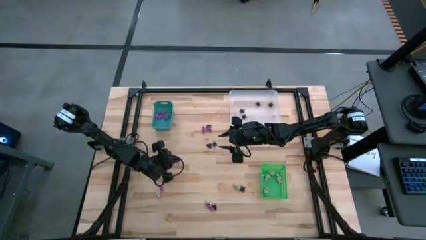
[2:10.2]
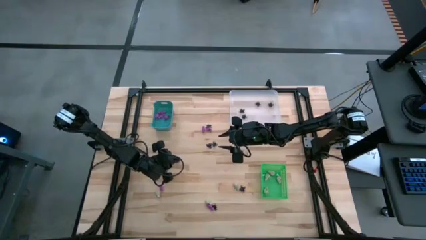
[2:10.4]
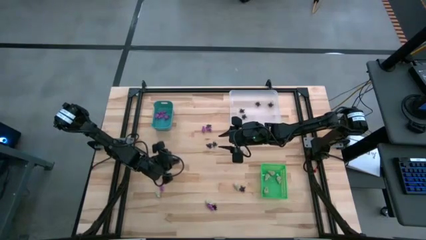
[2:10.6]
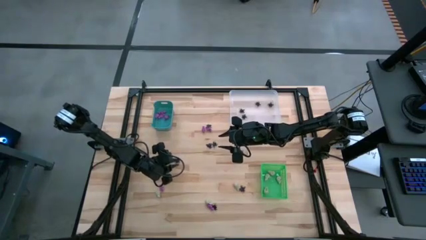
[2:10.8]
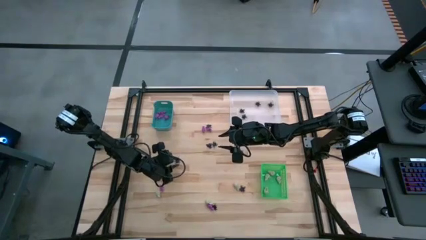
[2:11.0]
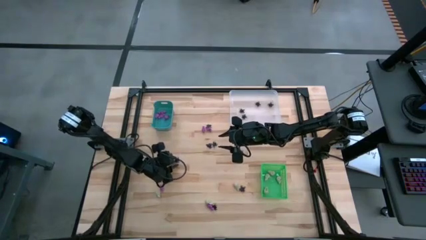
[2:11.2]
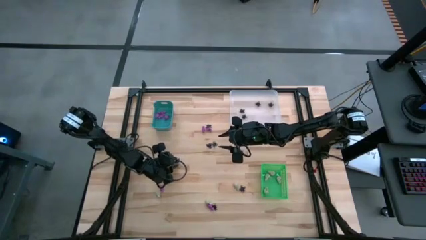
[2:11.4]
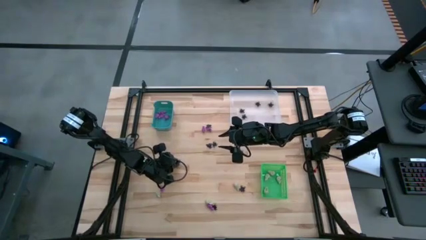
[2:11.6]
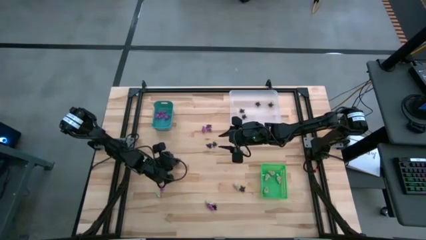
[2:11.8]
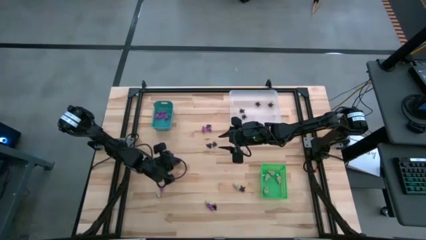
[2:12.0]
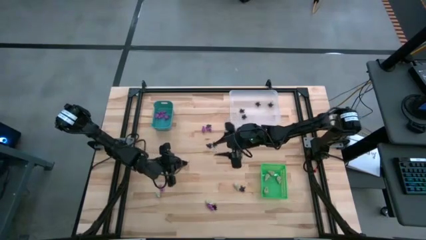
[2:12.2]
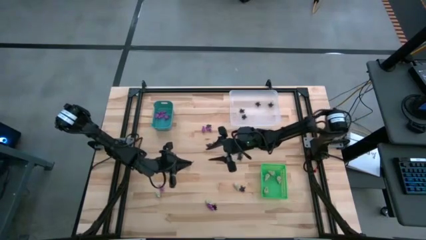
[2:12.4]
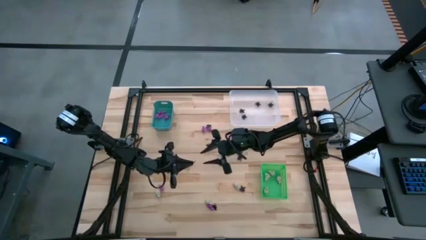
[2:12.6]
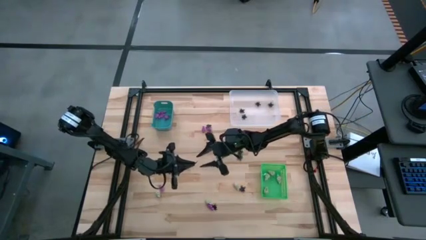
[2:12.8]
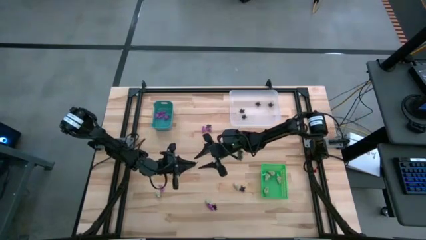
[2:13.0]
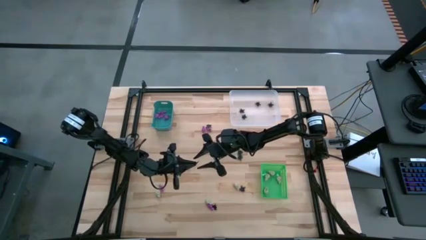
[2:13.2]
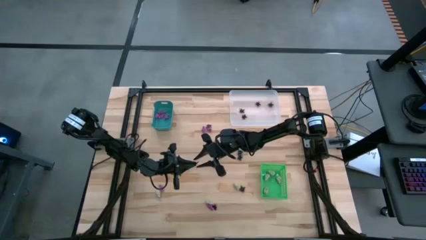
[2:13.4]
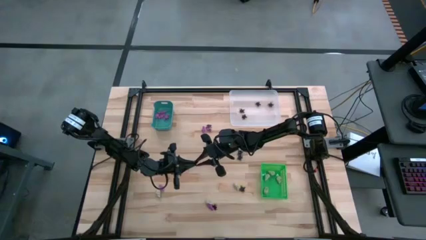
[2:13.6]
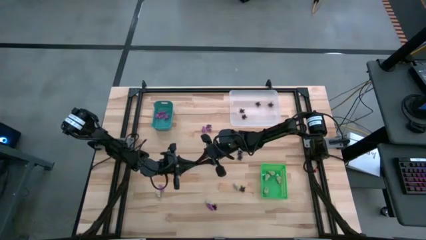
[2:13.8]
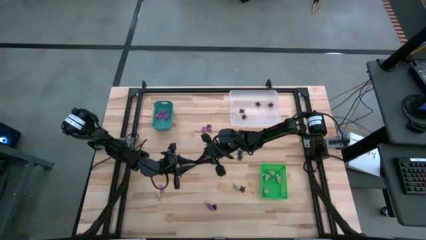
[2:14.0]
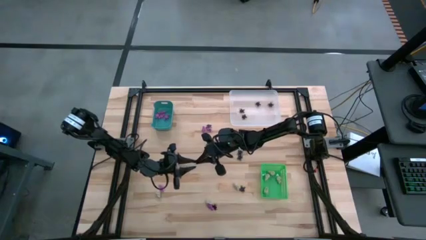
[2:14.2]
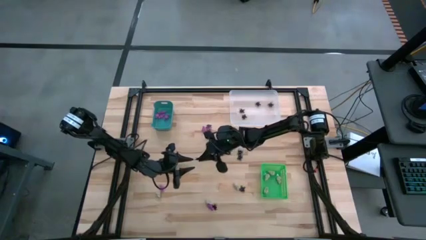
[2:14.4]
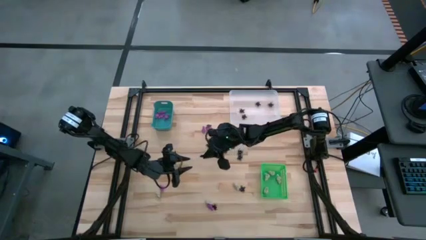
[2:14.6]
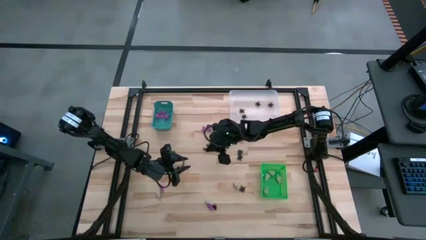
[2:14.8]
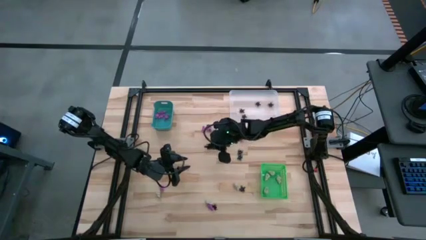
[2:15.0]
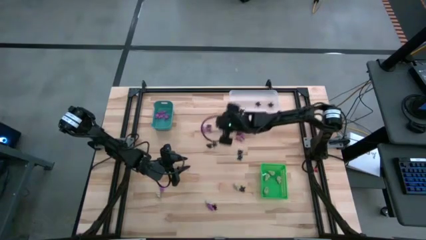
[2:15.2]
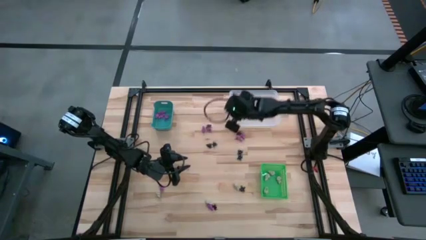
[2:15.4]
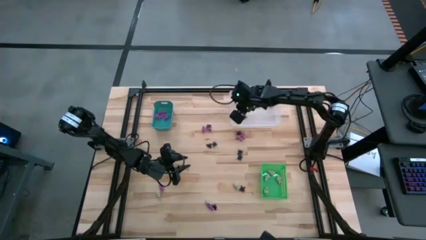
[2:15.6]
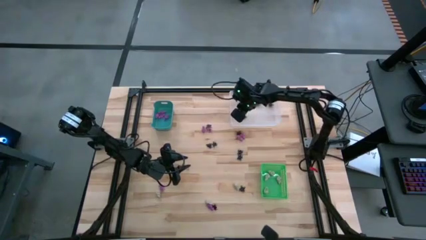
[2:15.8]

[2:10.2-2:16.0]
Task: Sort Halloween decoration
Put the black spider toy into the white bin

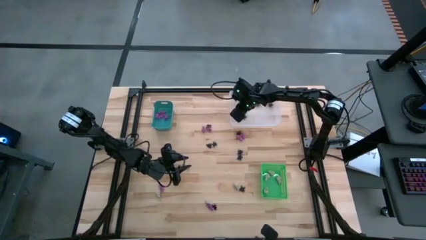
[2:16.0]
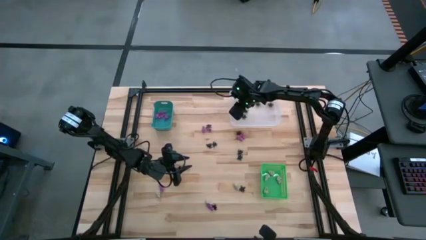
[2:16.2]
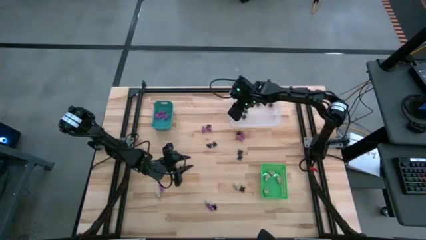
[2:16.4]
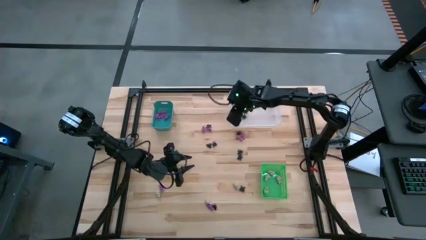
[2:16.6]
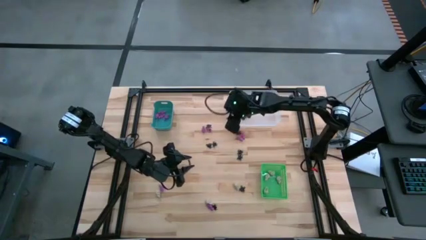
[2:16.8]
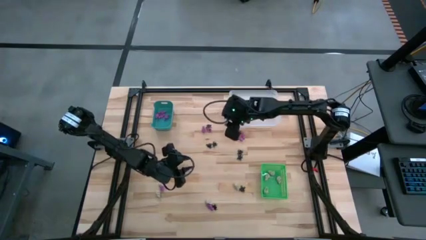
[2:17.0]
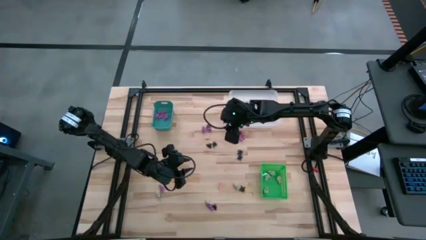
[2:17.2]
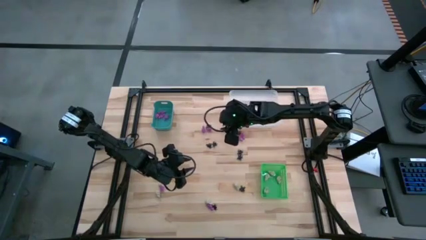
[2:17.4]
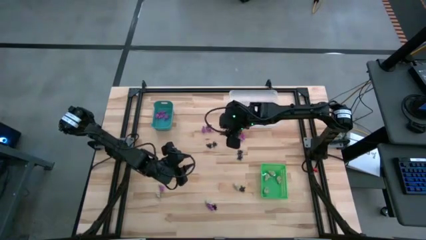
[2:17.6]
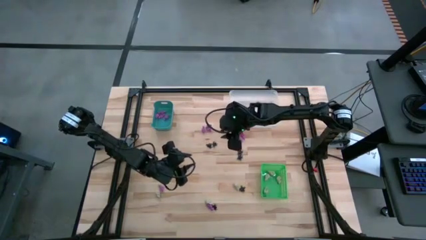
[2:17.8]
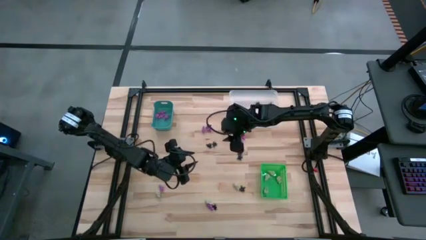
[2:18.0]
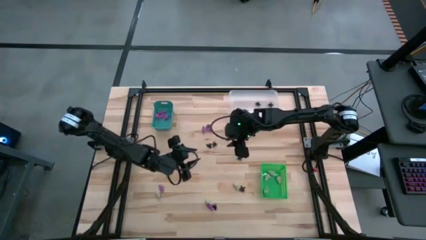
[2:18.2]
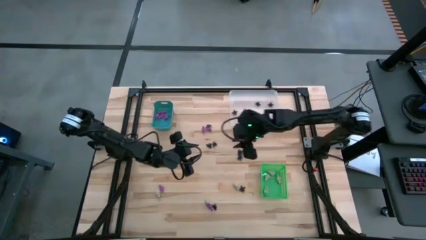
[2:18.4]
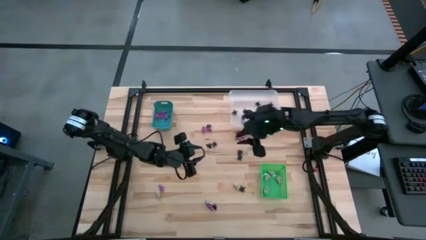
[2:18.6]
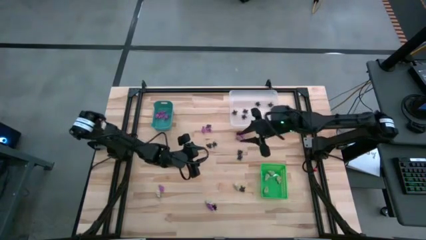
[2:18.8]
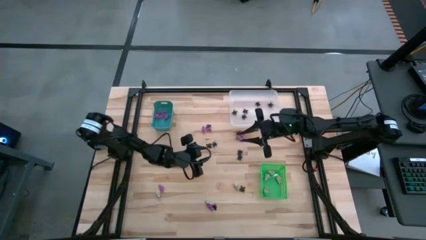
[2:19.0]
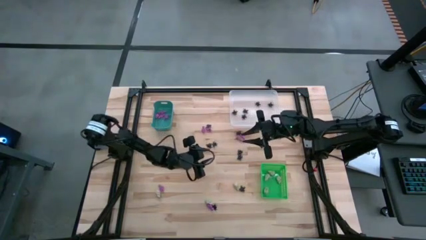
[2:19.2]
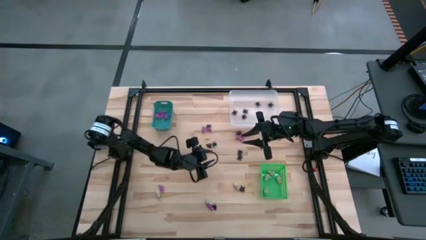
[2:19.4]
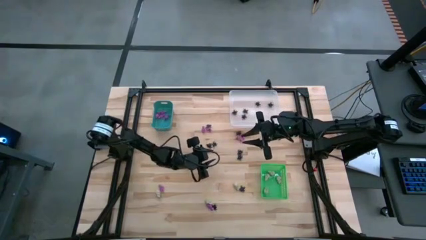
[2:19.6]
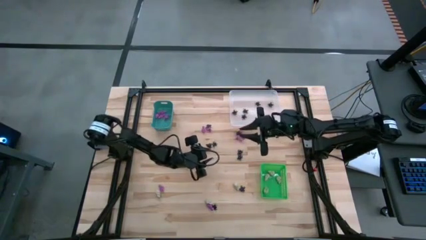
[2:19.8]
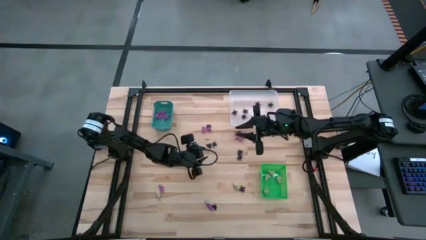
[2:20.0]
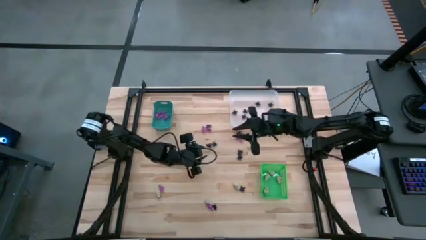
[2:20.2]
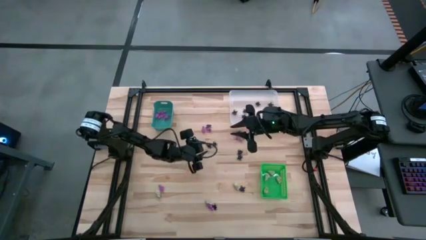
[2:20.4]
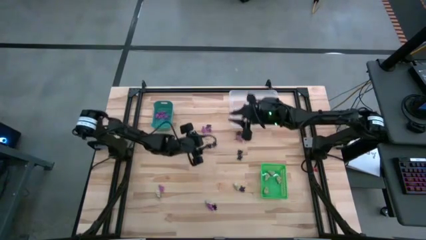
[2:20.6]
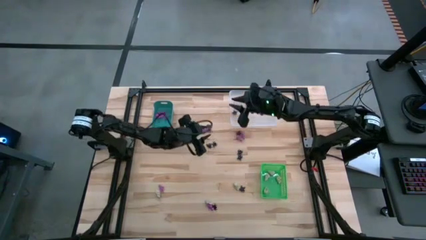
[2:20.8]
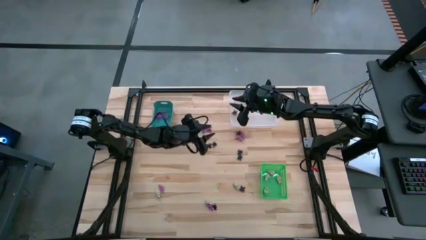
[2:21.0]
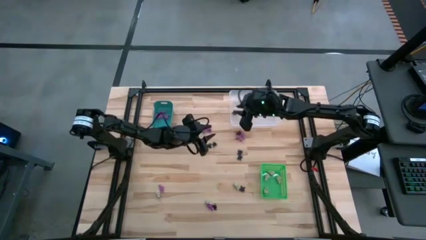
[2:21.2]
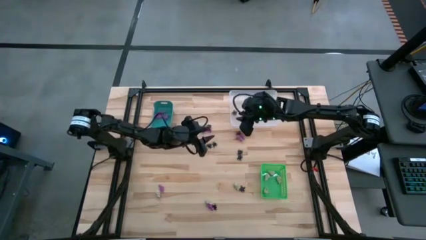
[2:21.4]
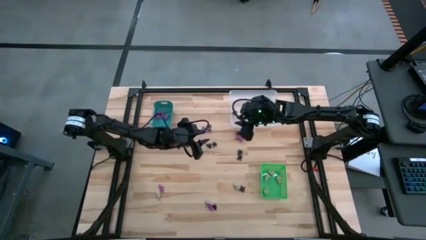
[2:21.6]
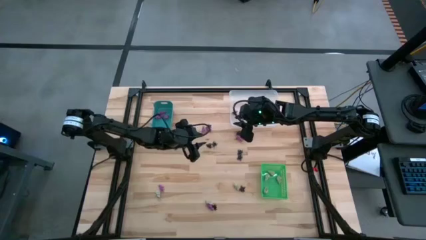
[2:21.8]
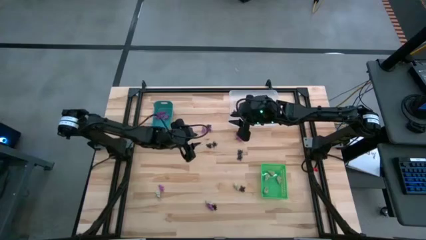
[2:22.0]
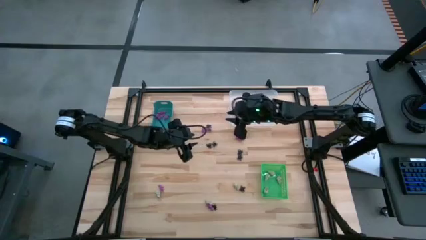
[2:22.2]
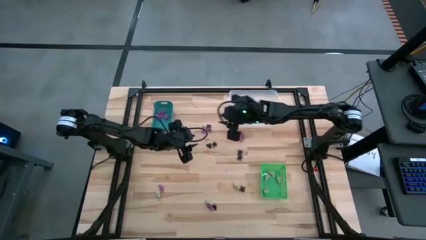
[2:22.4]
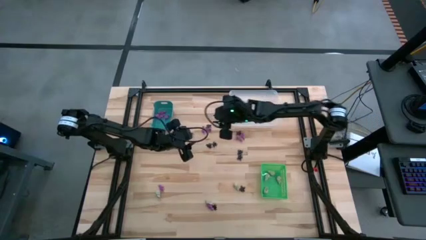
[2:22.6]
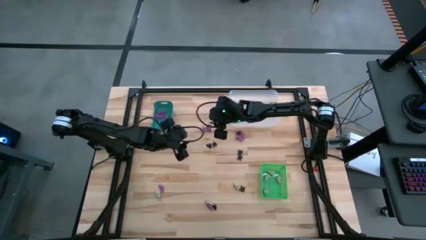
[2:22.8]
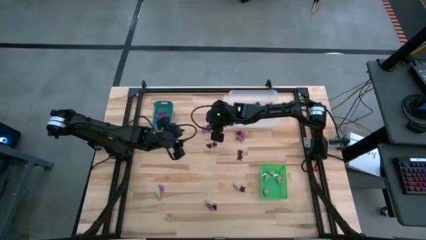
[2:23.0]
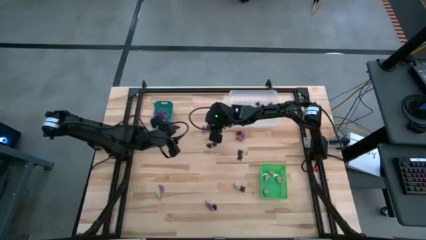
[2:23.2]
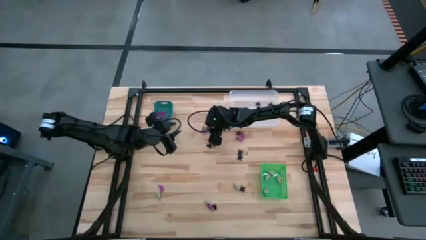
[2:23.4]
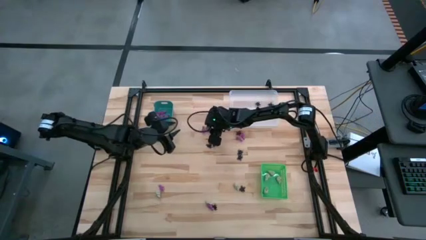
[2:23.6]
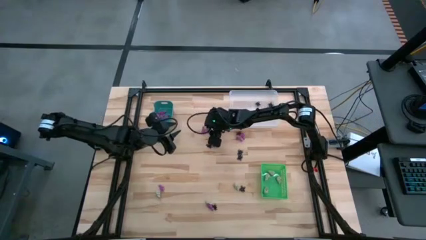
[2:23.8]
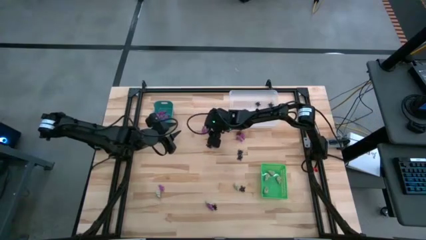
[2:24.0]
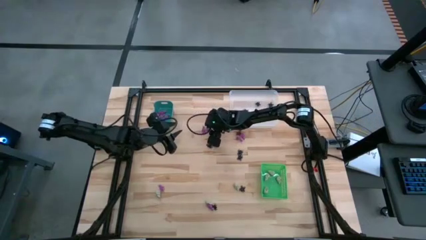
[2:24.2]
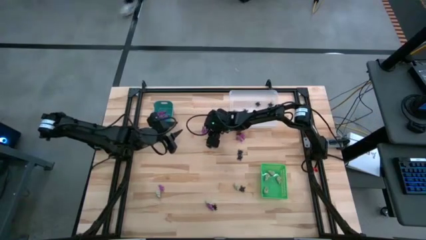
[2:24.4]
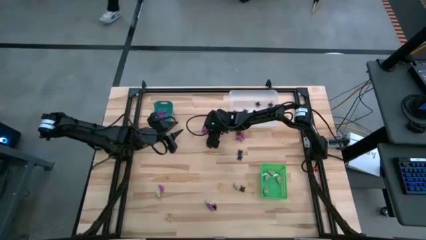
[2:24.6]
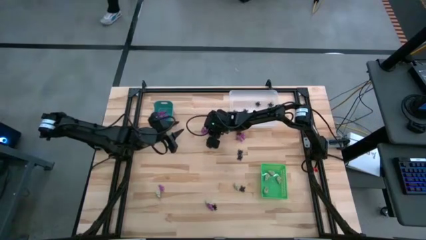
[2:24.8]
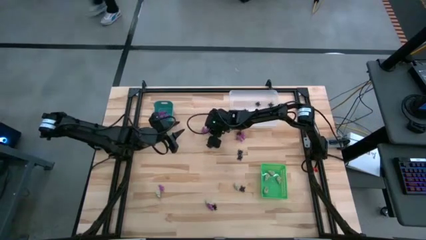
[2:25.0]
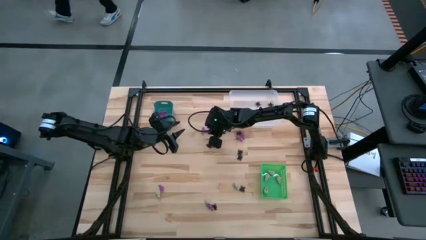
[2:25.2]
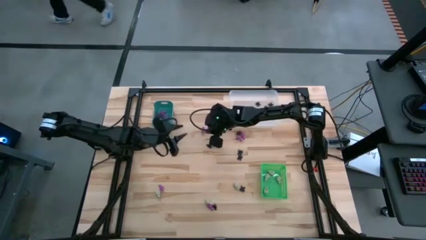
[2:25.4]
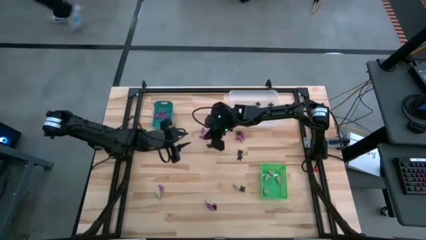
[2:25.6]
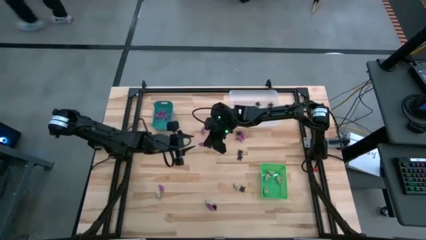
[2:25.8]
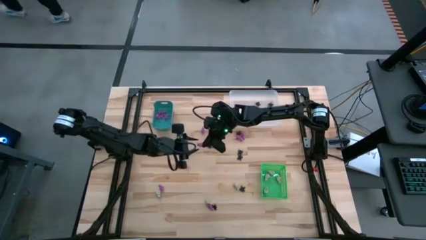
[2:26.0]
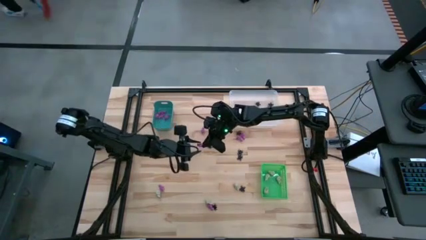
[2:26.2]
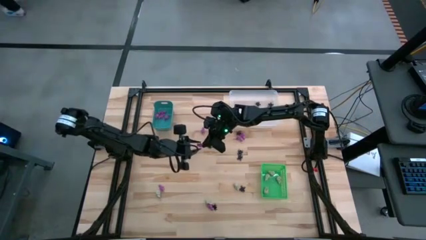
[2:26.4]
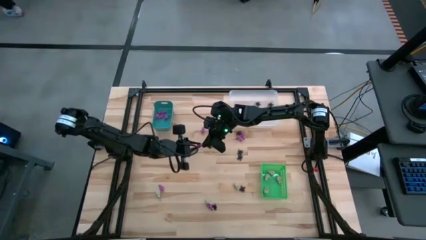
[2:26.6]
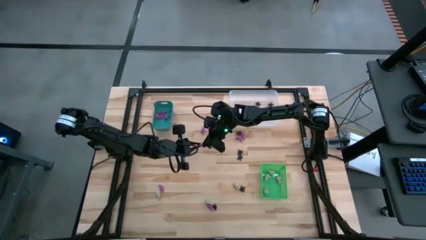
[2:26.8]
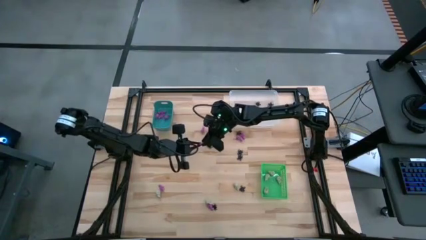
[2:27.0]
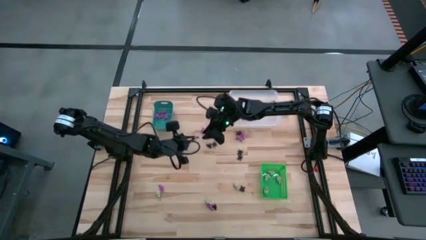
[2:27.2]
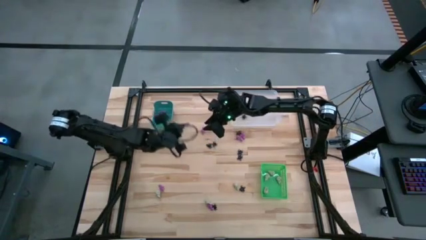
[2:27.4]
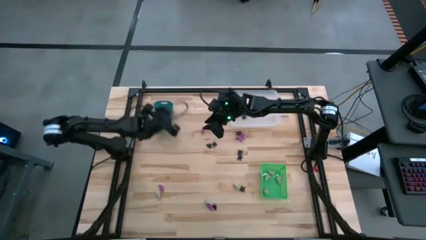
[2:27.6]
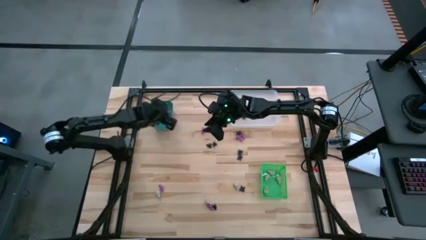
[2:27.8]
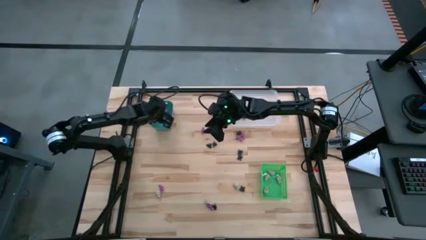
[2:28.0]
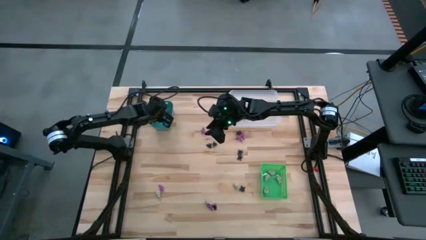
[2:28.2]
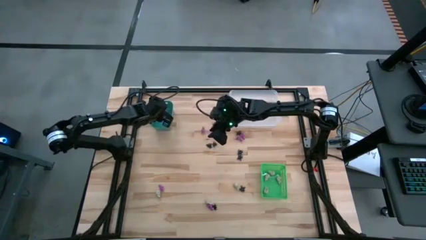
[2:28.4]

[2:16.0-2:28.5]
Put the purple skeleton toy into the blue bin
